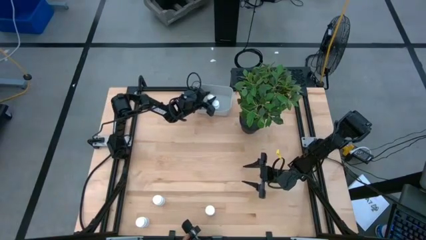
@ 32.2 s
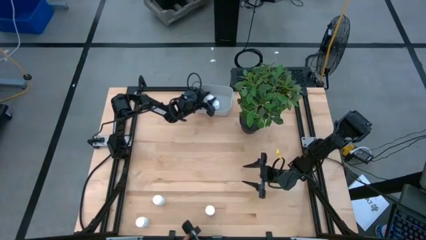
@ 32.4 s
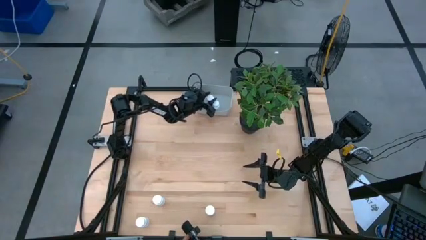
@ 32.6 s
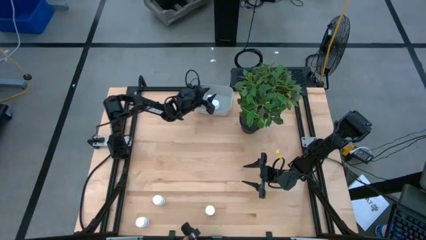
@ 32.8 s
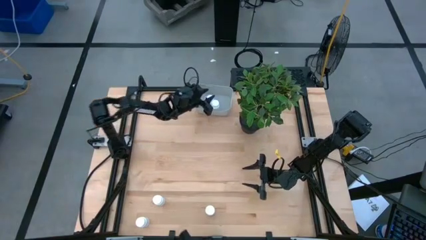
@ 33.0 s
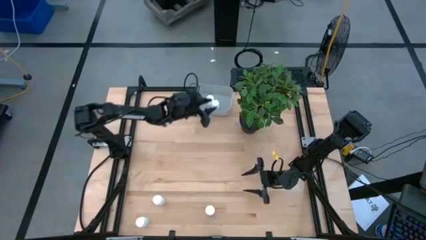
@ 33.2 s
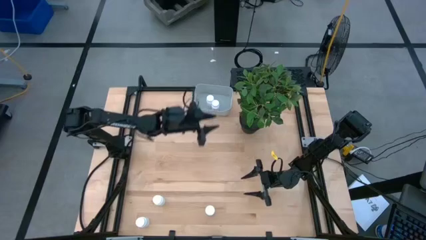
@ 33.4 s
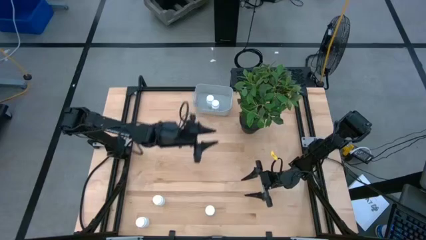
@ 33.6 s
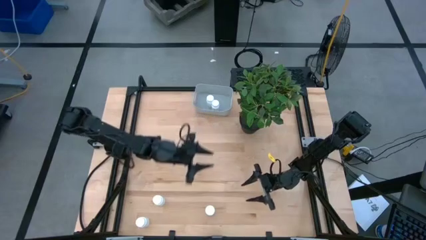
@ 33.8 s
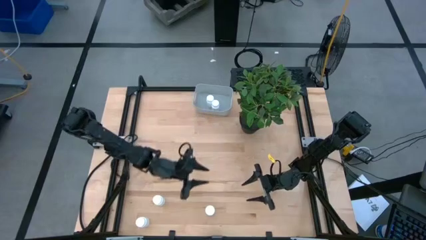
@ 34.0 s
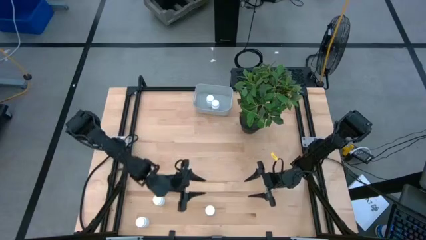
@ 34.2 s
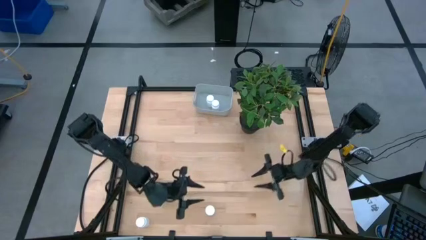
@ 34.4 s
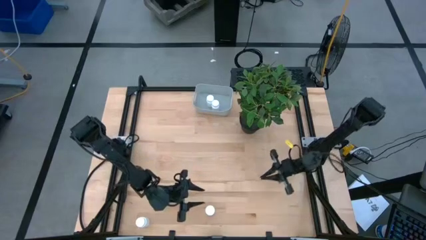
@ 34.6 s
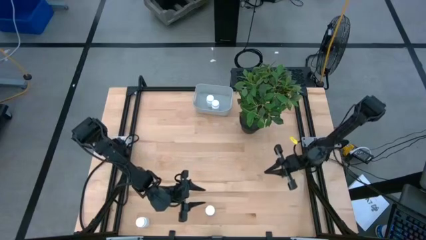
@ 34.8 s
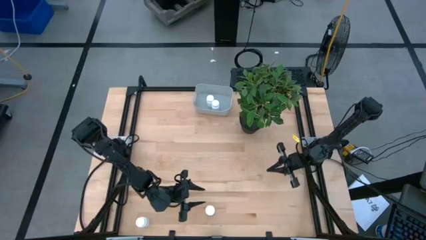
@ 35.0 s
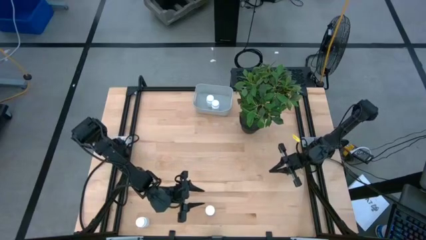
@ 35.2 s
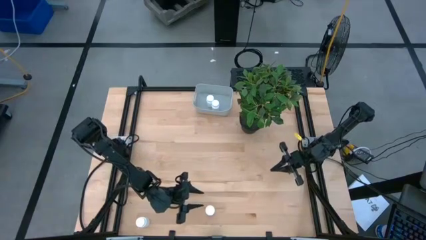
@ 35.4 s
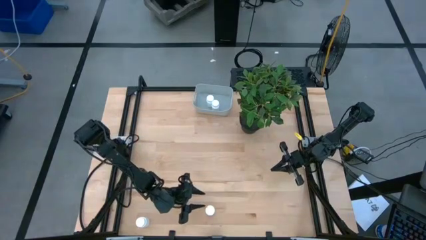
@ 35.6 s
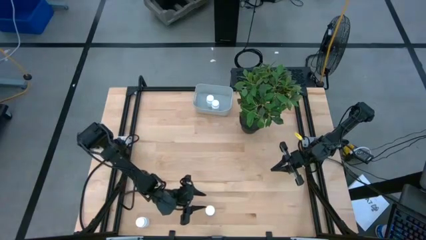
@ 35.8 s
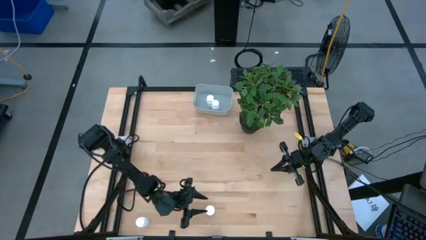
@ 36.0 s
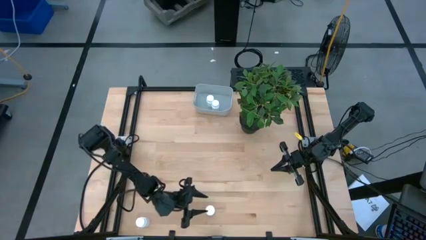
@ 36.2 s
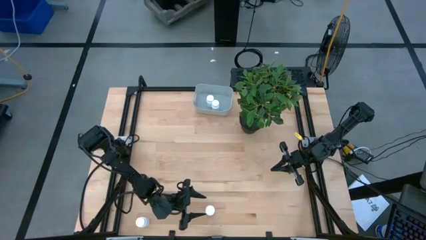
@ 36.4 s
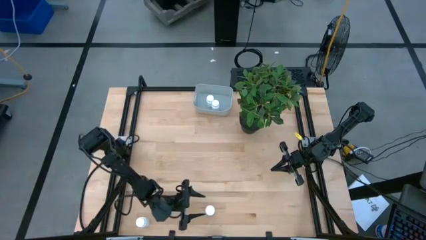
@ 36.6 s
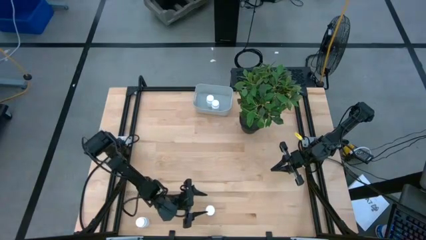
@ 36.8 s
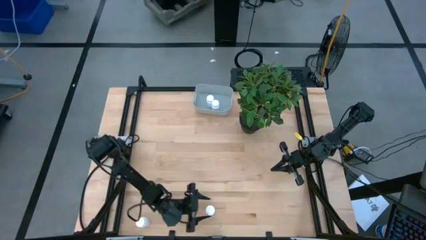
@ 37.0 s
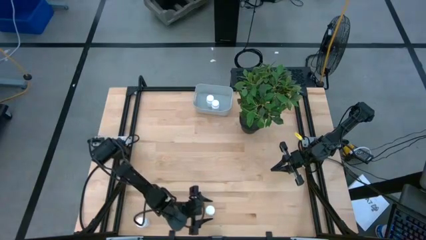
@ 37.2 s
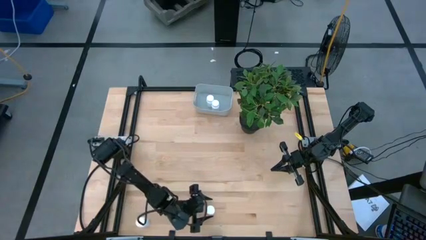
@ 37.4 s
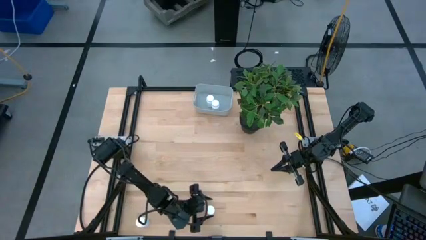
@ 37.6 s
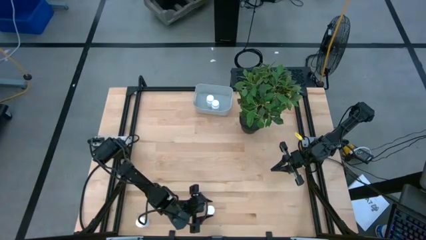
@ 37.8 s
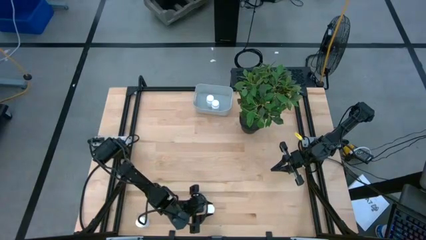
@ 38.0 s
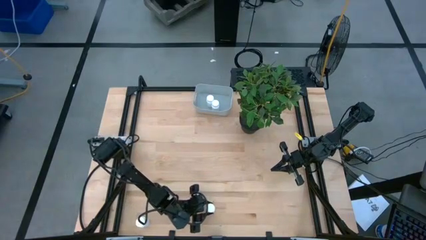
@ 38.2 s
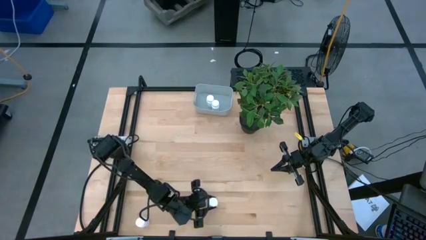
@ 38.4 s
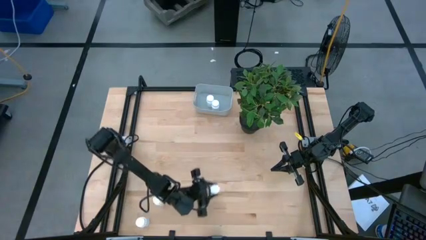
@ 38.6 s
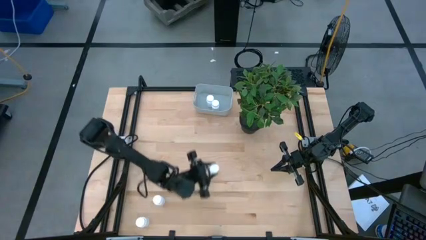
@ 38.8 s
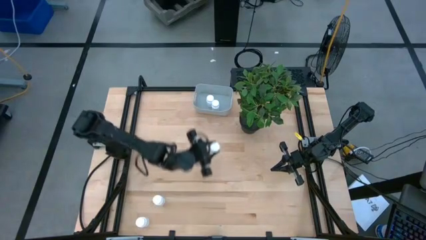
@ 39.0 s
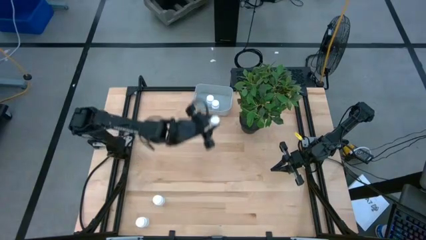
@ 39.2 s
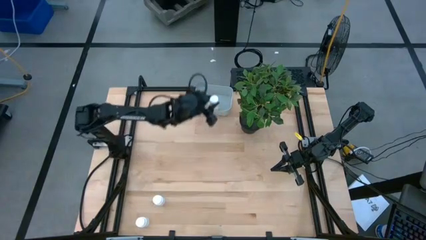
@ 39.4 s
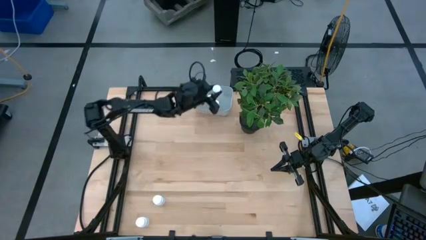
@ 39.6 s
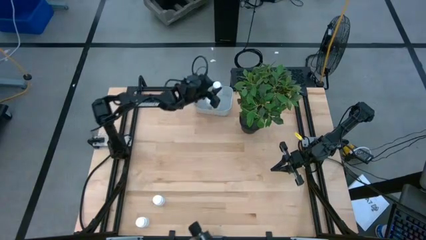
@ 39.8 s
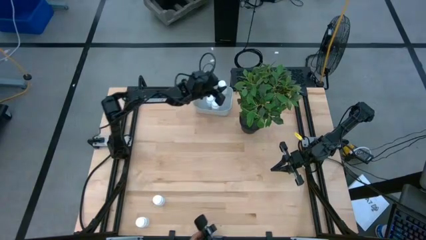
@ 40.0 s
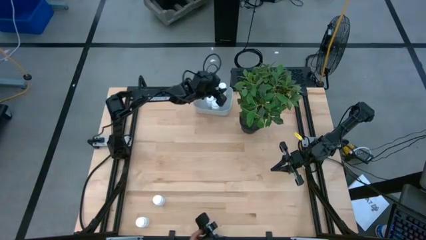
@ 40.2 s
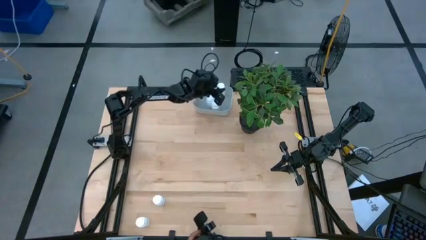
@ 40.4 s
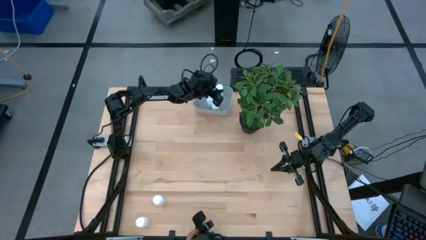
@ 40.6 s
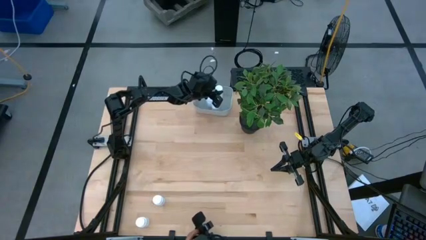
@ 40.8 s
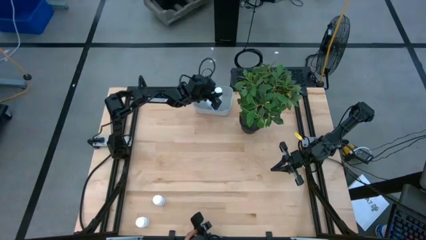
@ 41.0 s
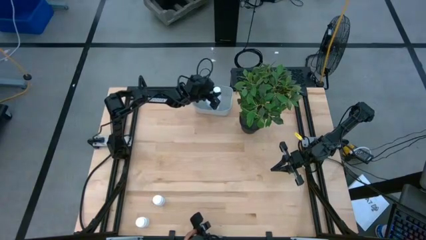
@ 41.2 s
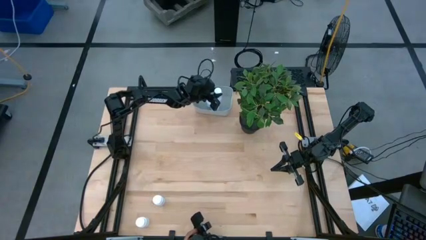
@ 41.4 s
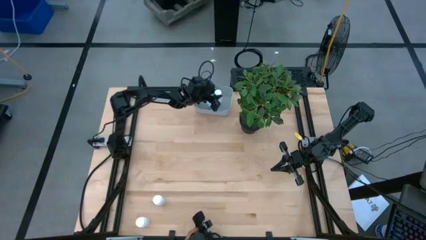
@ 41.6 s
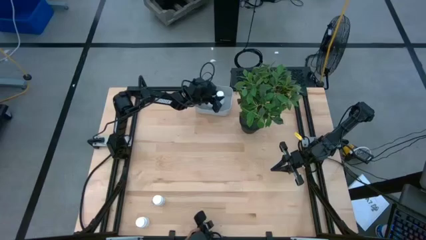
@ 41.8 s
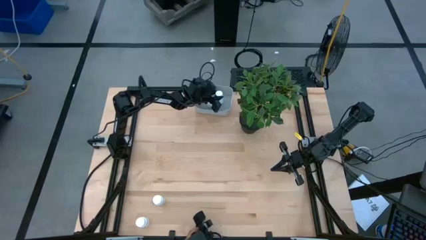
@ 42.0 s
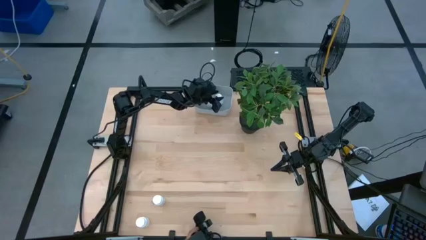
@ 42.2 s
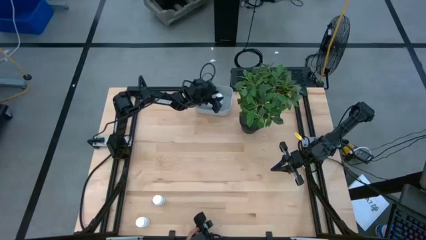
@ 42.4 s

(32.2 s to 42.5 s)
Task: Pick and place pill bottles into a basket
Put the white pill bottle into the gray bin

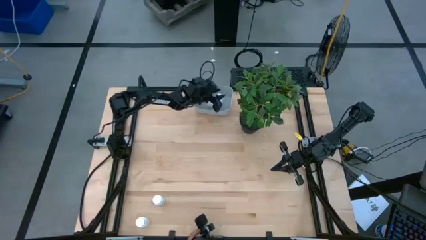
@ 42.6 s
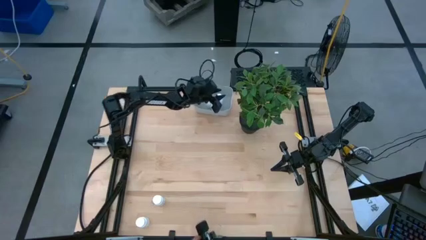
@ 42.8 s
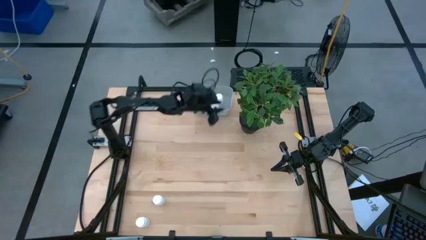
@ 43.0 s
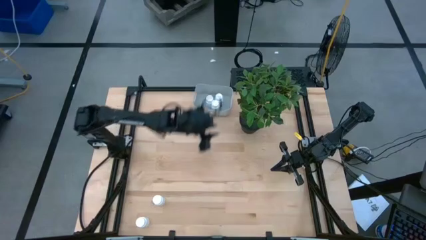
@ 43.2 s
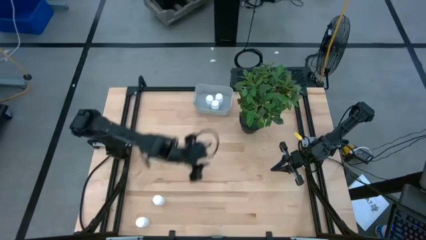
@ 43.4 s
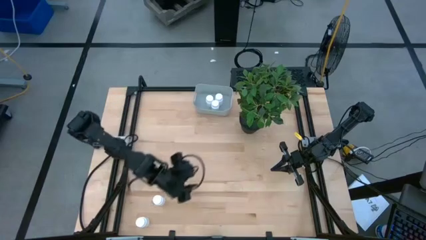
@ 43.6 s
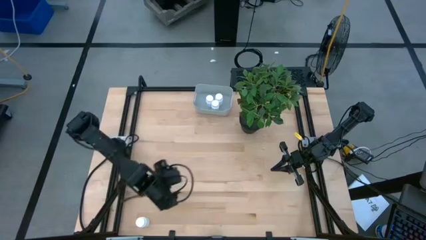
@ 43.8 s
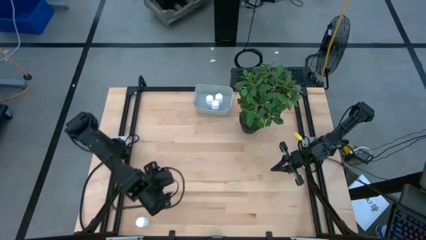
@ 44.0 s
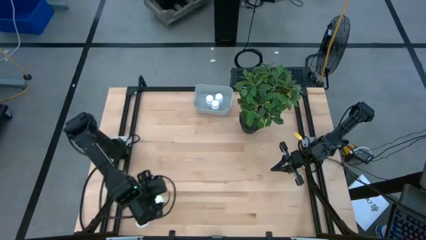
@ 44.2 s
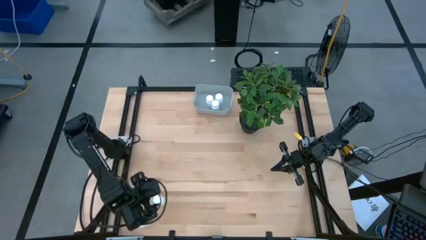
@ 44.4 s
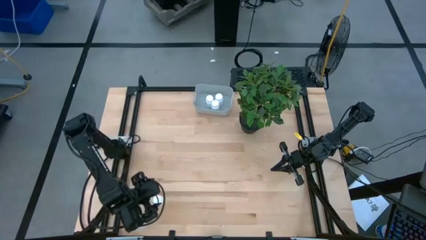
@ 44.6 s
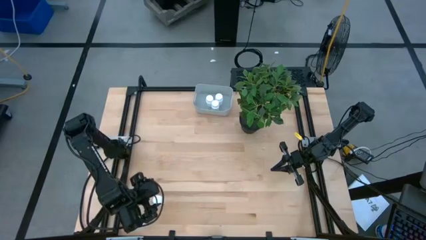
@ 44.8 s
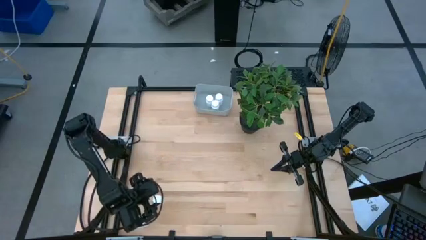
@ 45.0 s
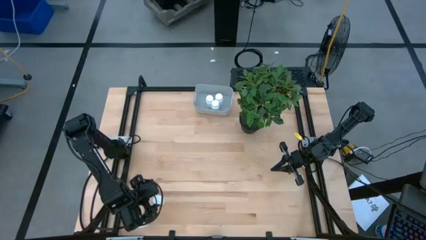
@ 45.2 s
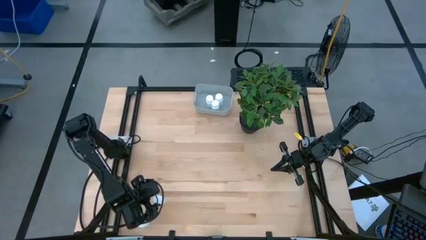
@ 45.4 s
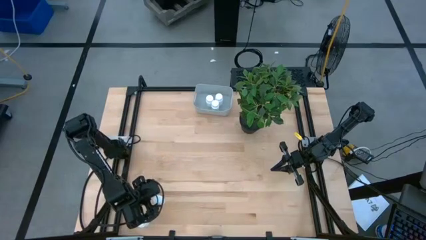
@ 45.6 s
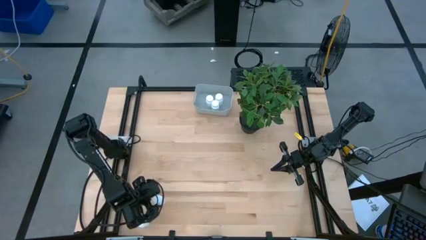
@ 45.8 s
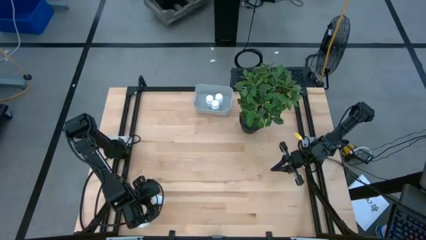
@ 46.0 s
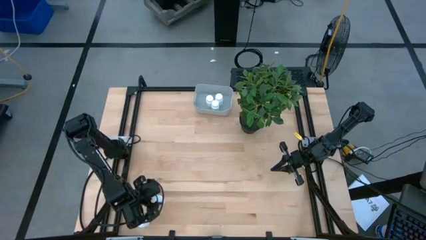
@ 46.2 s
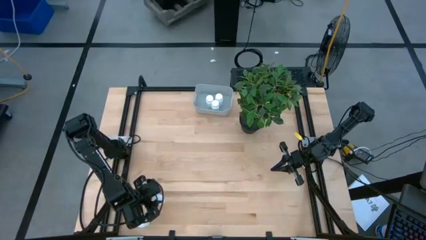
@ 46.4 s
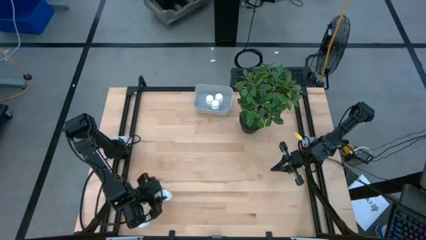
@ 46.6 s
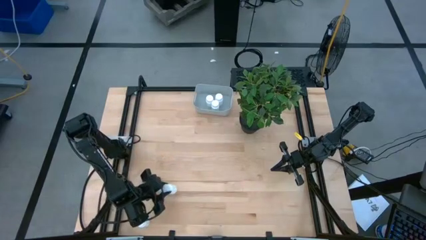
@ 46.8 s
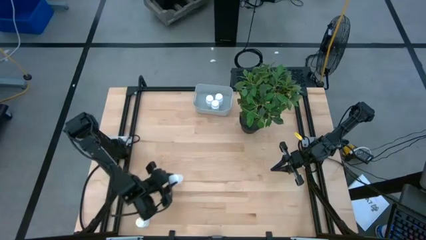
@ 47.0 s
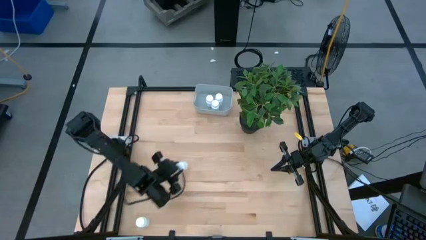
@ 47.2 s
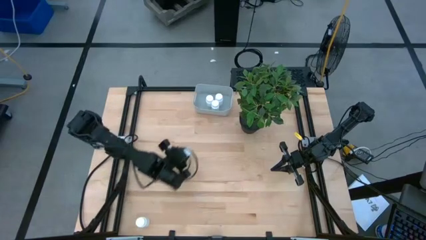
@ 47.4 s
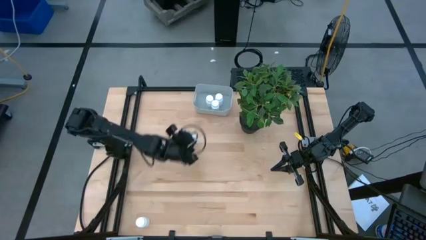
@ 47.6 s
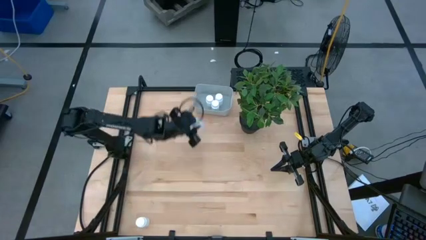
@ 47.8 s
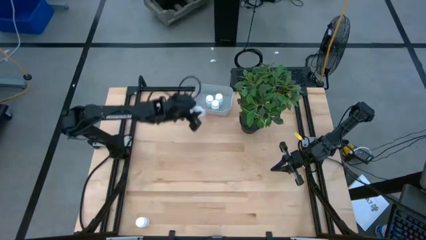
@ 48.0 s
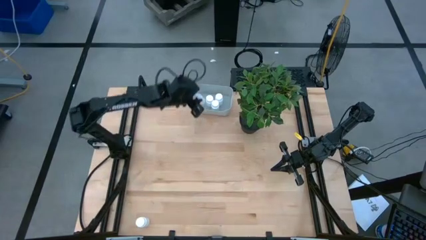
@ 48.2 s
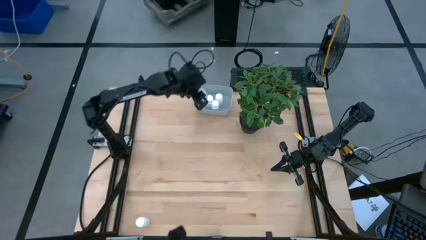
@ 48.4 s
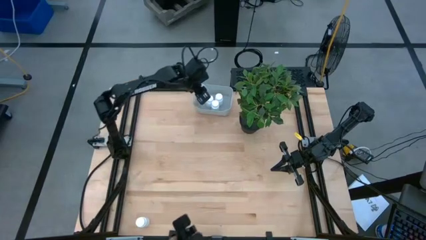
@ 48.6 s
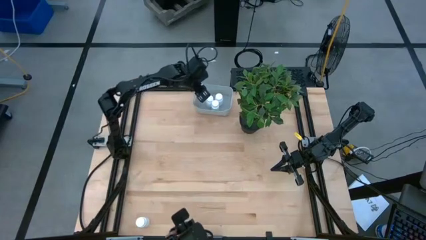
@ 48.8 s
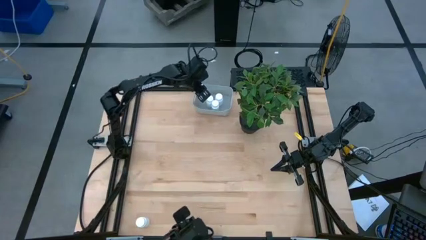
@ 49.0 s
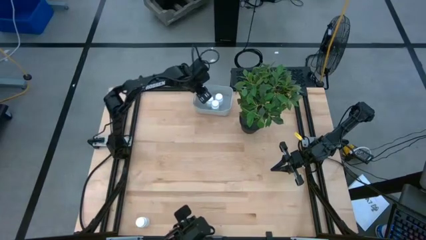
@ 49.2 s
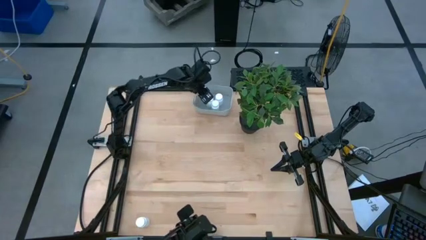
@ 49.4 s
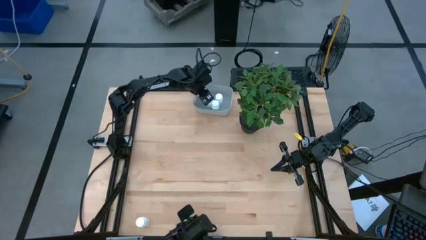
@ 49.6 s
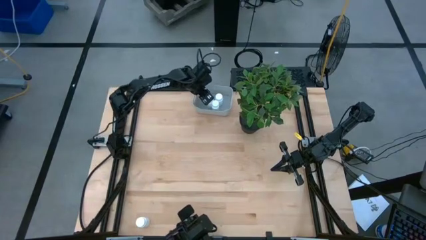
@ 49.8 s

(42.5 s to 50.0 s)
Put the white pill bottle into the gray bin
